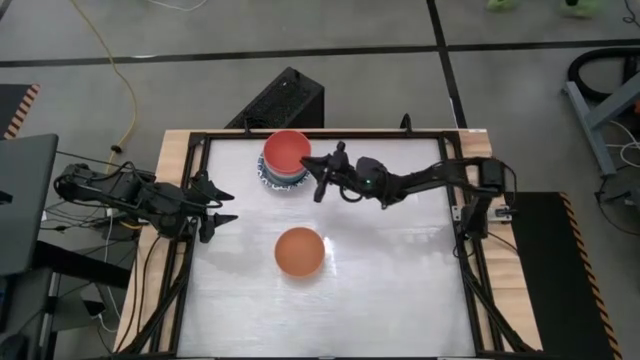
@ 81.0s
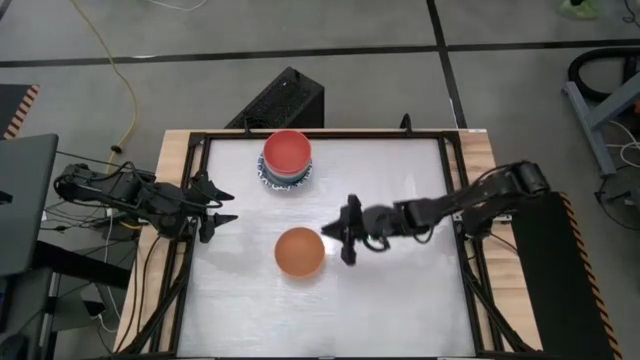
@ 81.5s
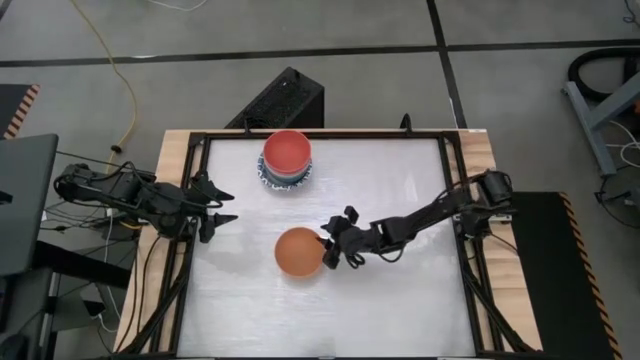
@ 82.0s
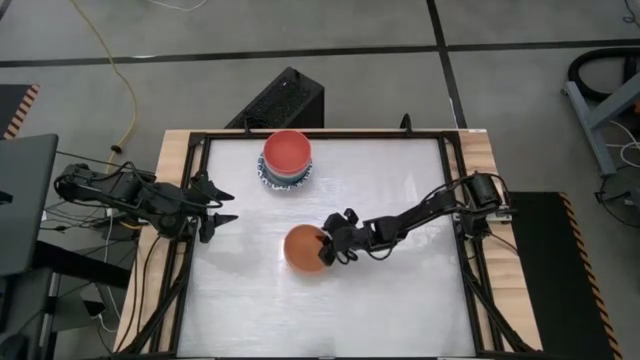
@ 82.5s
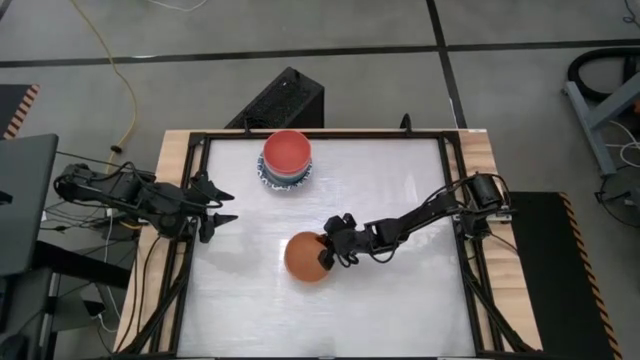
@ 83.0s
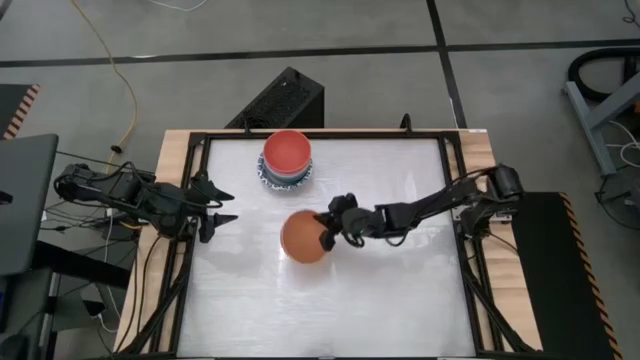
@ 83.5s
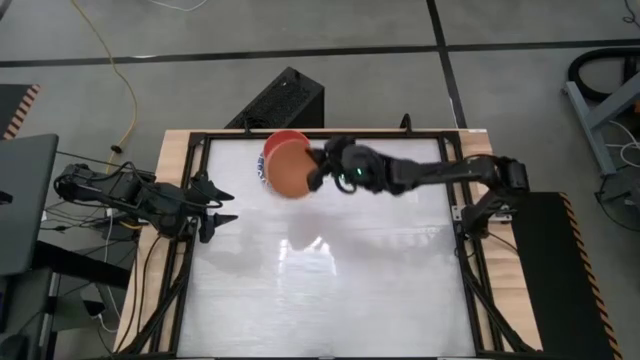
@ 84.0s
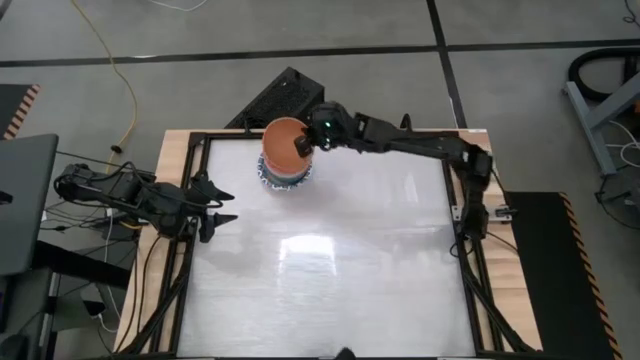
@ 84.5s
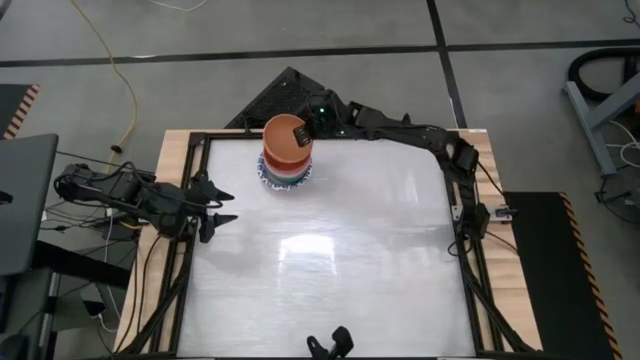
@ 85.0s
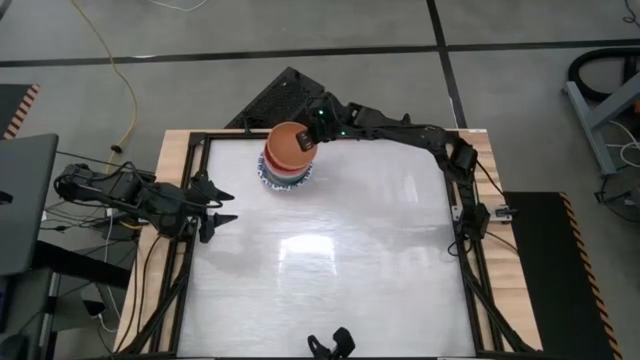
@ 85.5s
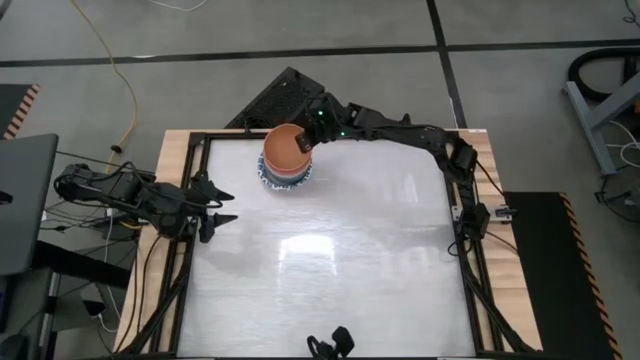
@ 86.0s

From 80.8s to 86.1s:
Stack the yellow bin on the orange bin

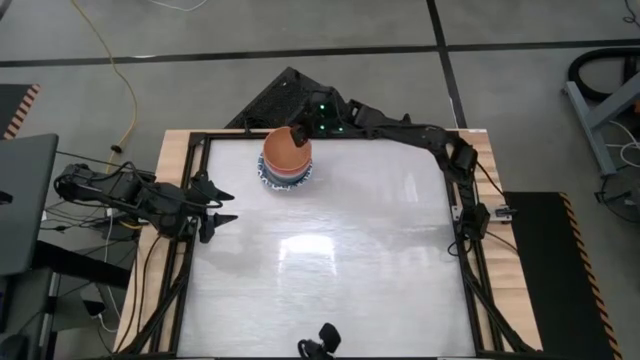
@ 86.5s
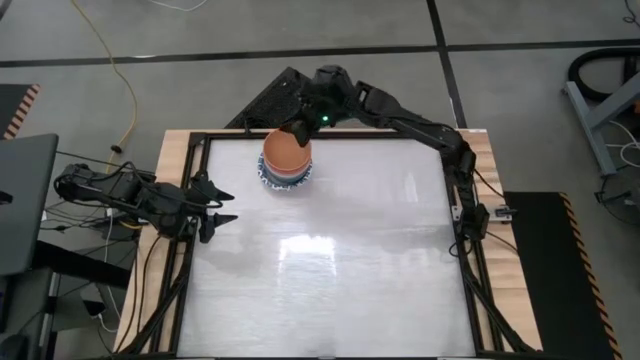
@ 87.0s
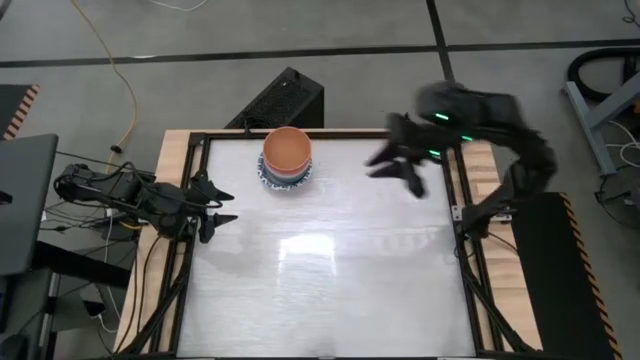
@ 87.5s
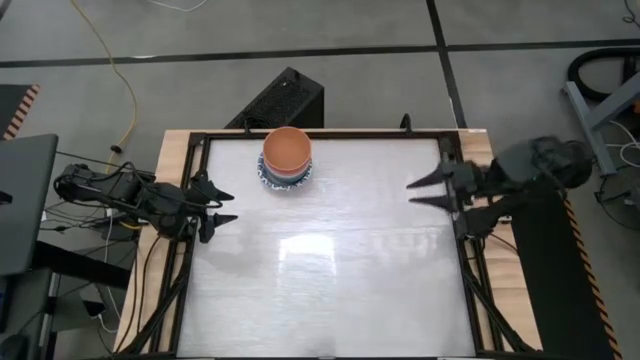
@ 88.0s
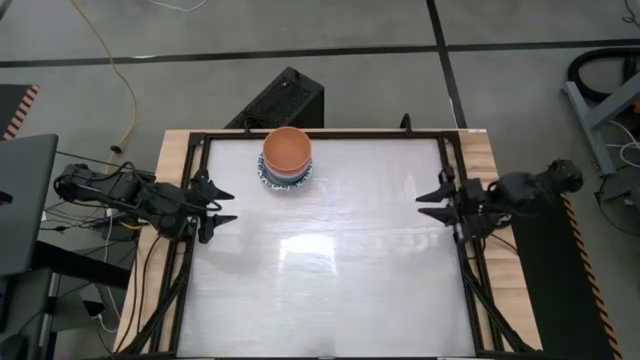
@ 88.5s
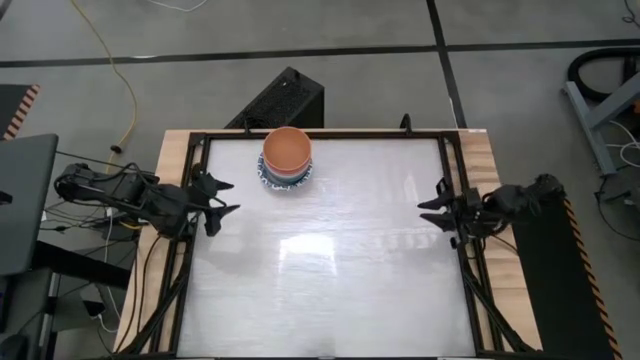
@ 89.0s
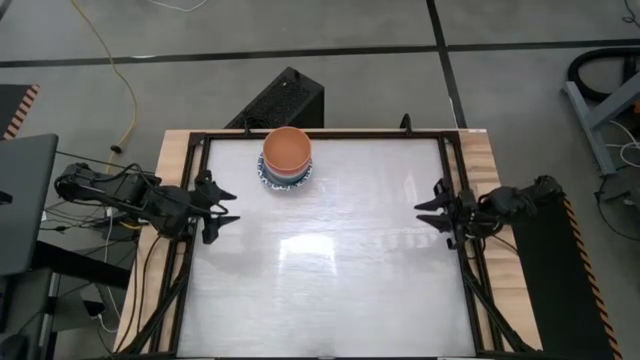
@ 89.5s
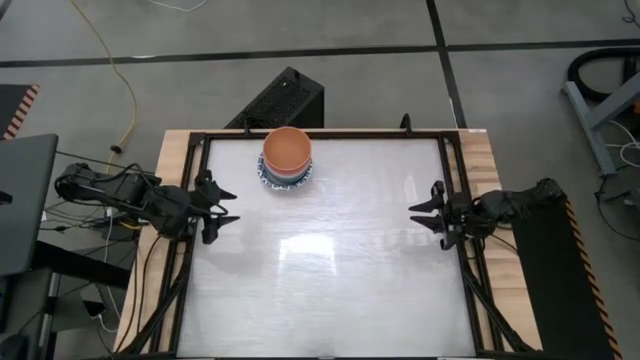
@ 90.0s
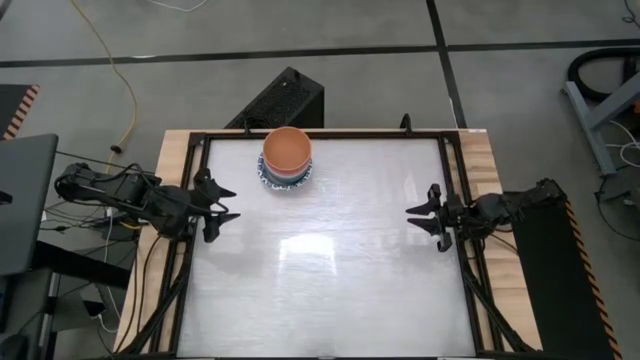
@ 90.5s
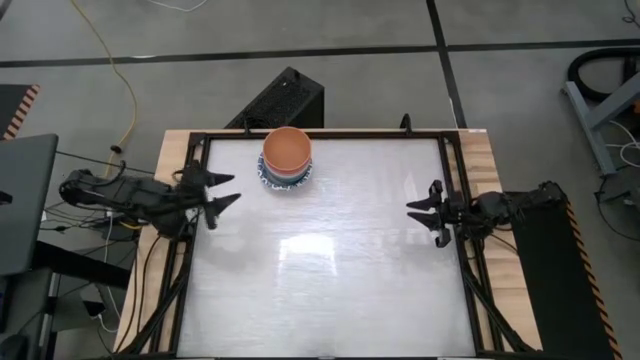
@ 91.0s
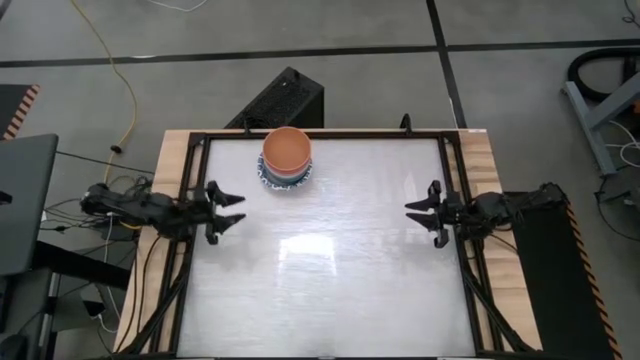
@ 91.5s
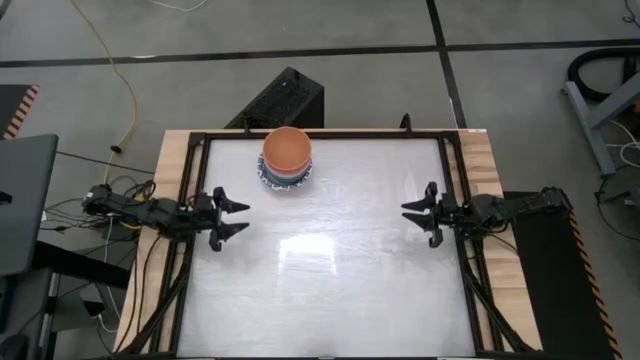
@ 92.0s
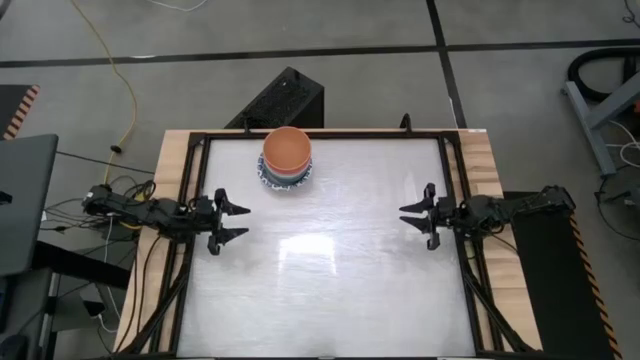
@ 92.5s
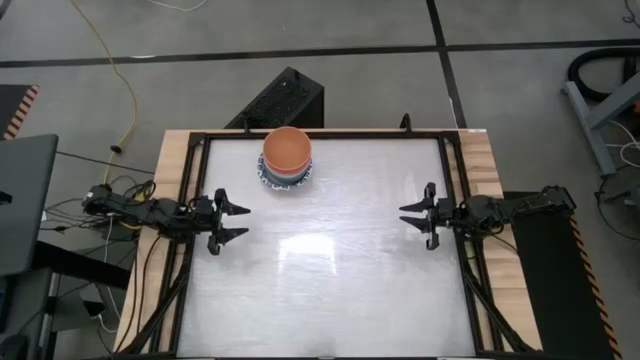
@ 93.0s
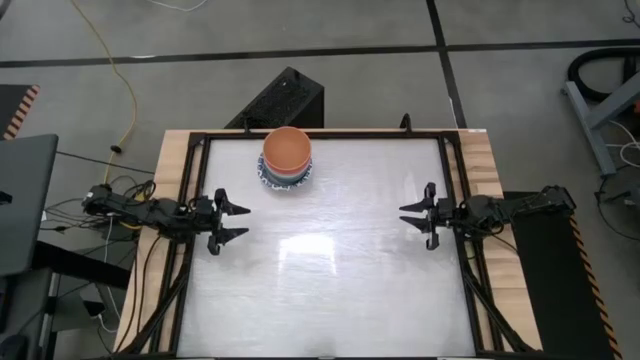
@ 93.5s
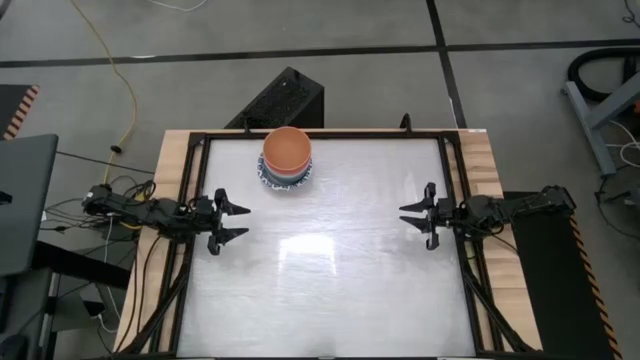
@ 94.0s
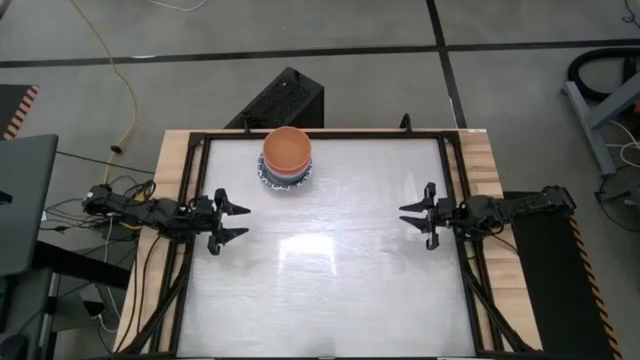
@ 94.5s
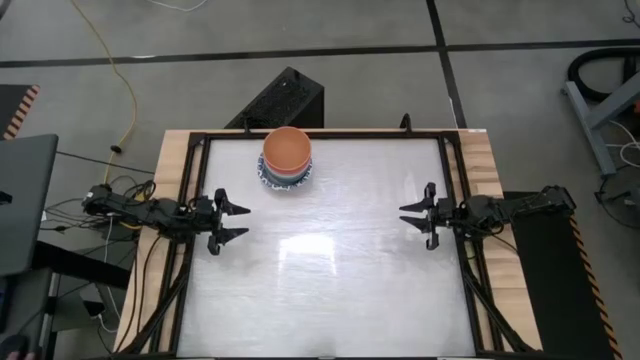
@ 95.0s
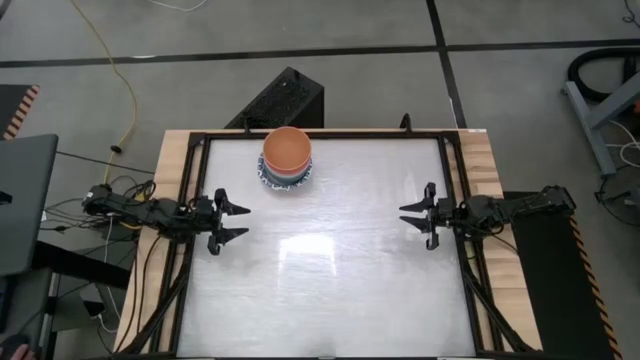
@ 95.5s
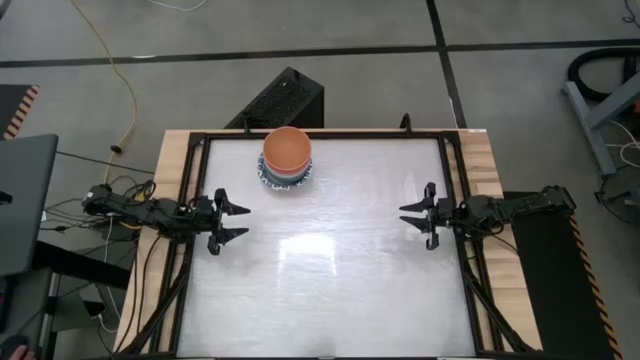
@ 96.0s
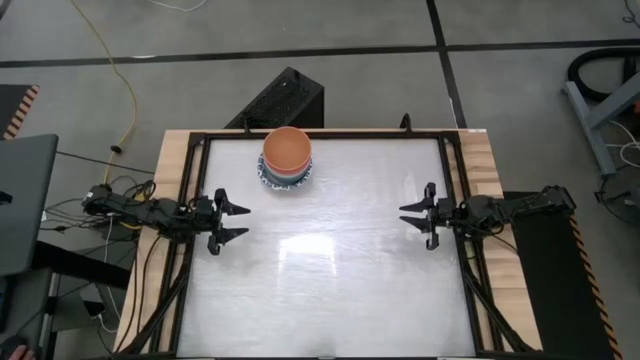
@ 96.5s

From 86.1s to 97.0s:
Return to Home Position
